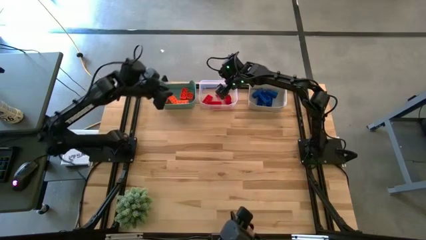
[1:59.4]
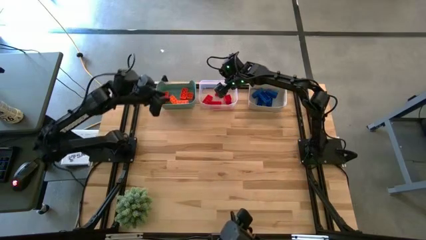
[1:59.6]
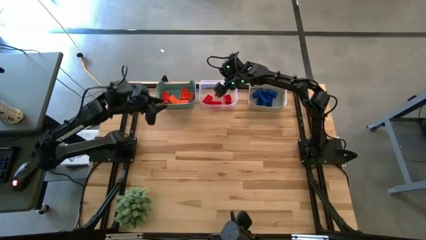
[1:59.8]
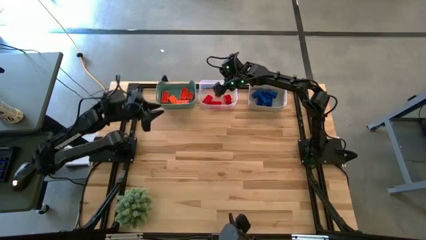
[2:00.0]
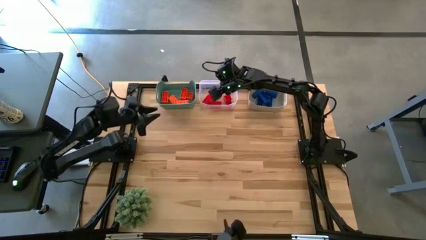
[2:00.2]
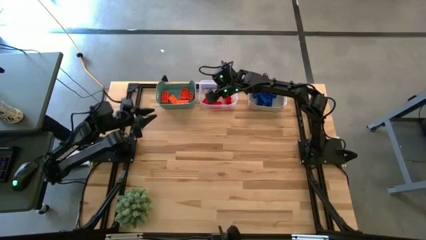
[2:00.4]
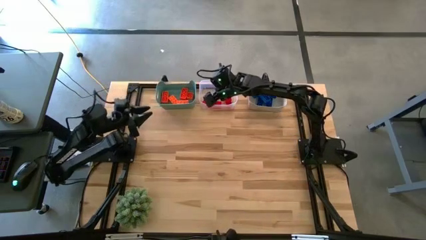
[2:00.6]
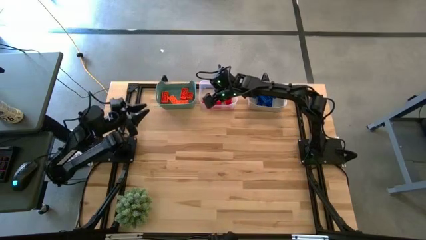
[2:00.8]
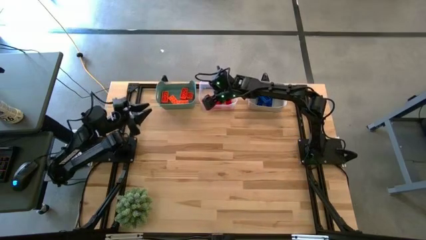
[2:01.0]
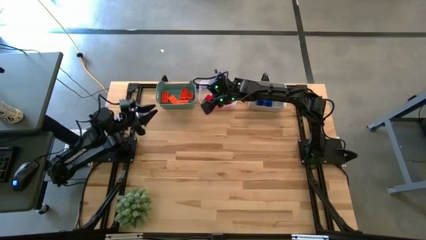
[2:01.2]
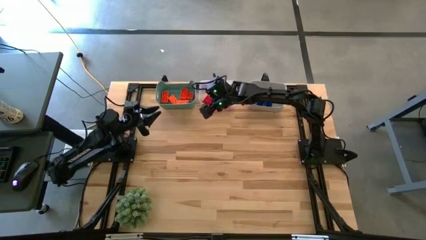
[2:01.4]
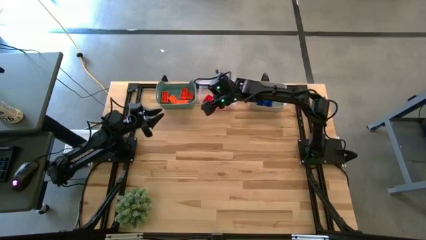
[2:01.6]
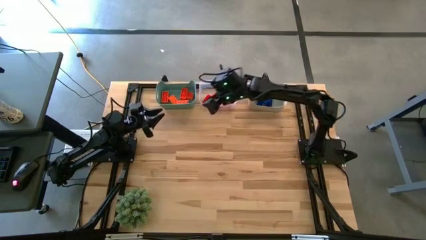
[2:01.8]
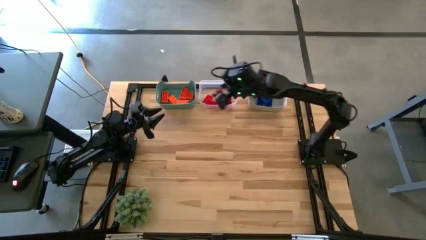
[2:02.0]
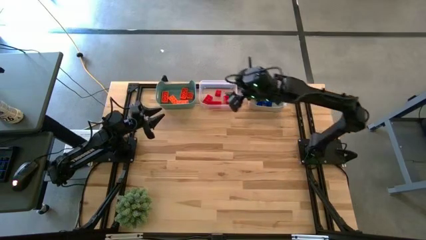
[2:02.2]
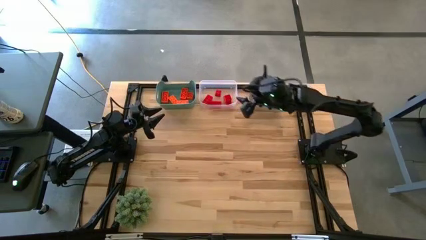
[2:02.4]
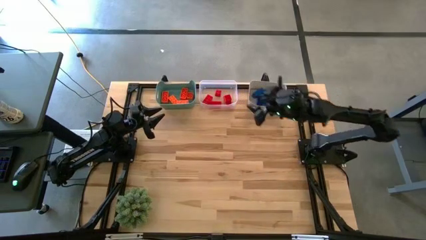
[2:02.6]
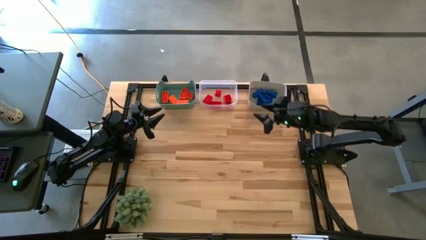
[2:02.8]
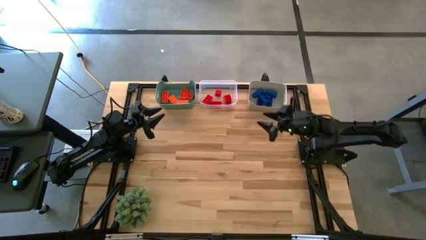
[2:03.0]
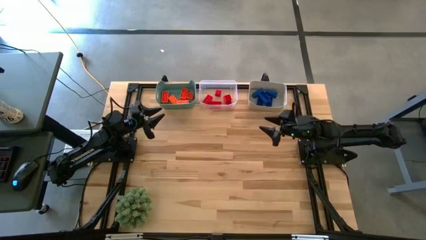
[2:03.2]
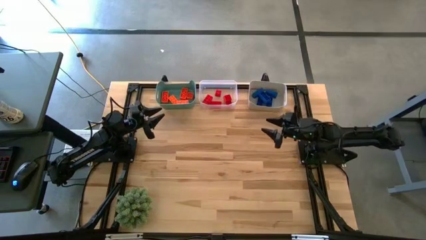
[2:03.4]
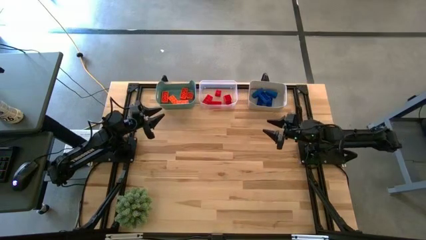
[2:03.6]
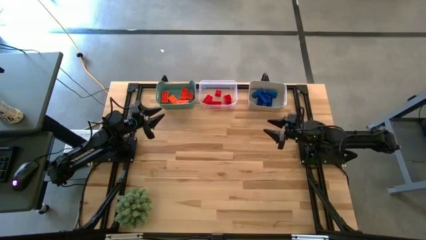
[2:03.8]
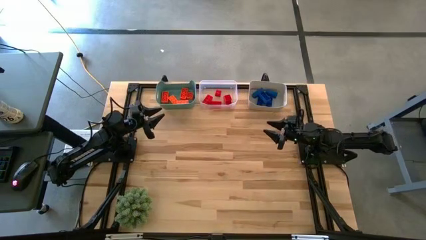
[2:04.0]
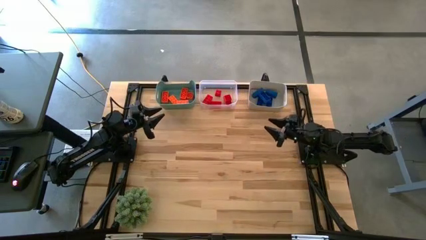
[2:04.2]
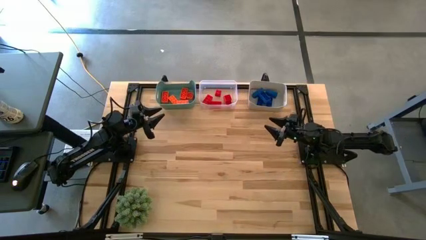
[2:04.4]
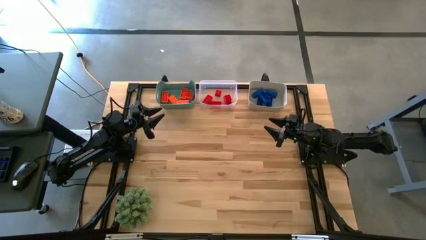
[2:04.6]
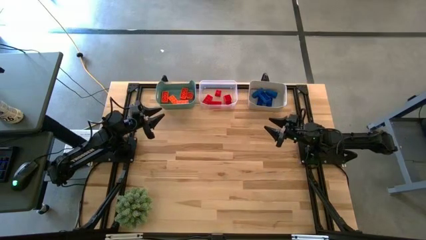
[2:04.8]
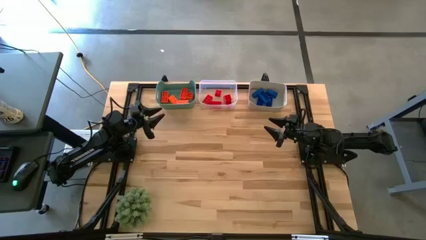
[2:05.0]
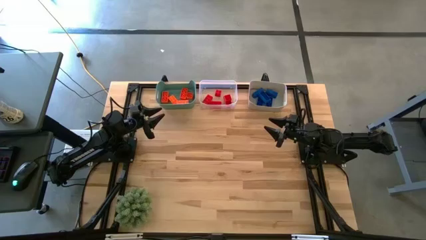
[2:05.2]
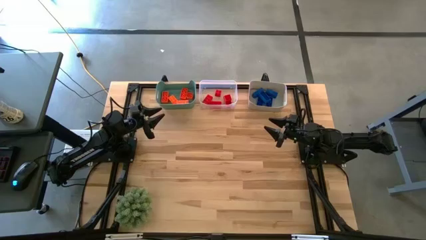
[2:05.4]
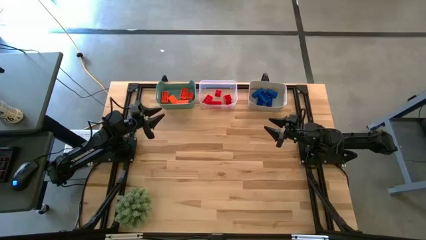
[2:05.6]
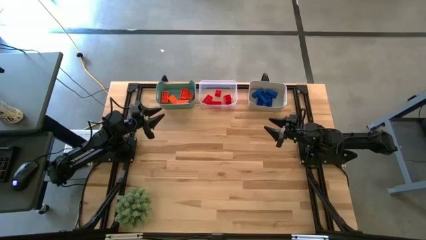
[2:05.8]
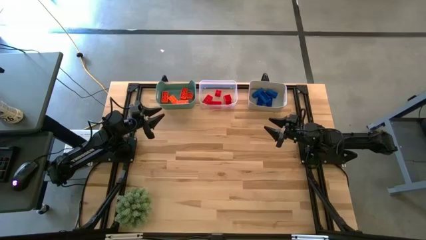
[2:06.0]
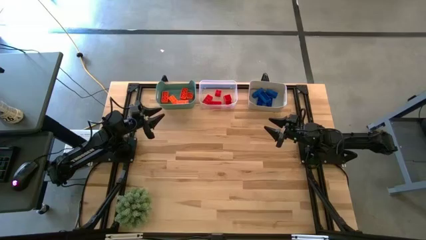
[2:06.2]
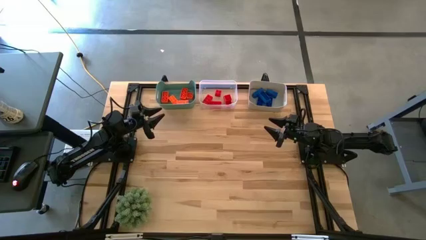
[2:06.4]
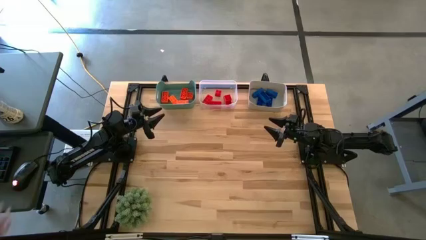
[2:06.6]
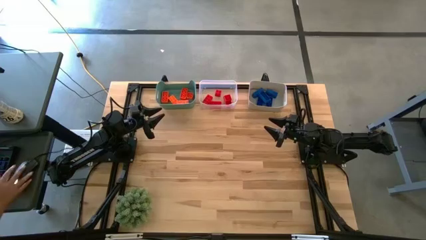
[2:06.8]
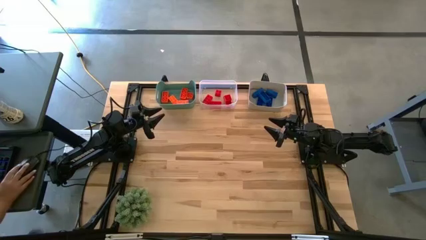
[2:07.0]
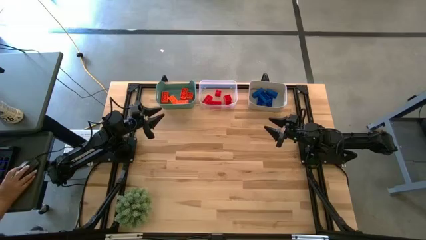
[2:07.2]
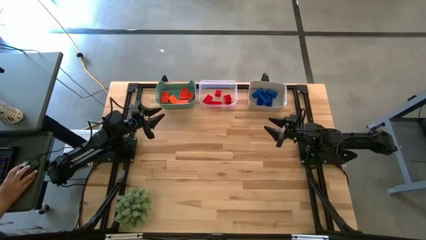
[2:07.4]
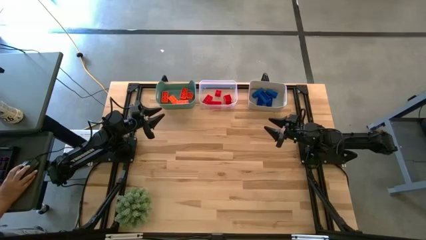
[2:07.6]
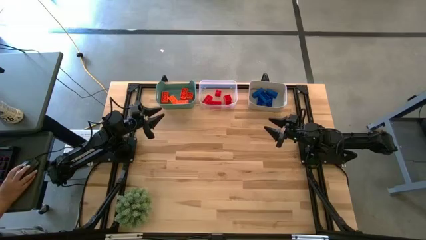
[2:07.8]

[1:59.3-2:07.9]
Task: Sort & place blocks by color
Return to Home Position

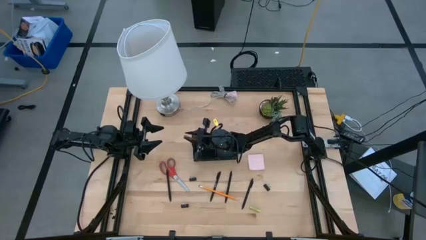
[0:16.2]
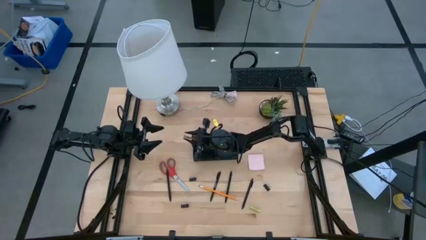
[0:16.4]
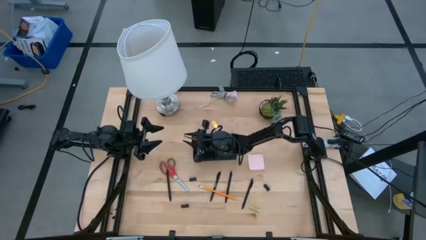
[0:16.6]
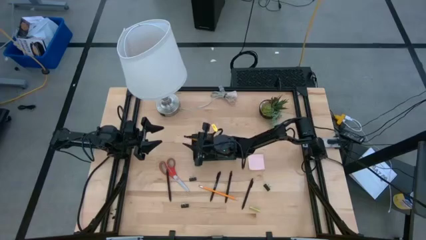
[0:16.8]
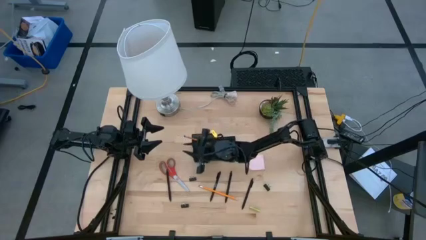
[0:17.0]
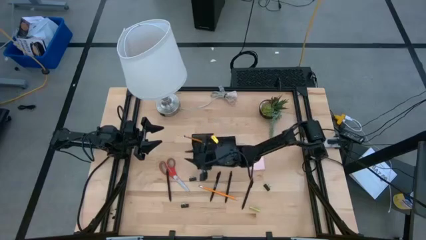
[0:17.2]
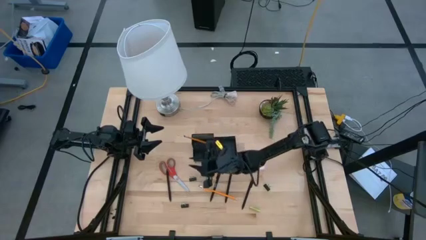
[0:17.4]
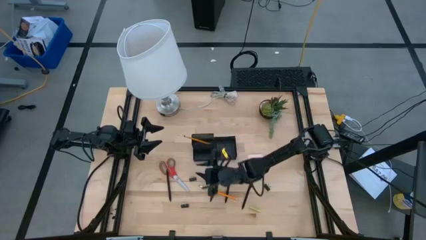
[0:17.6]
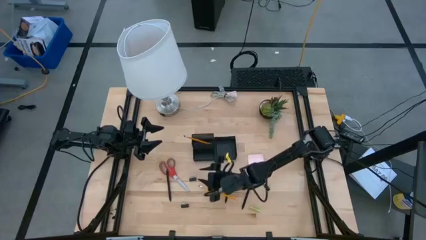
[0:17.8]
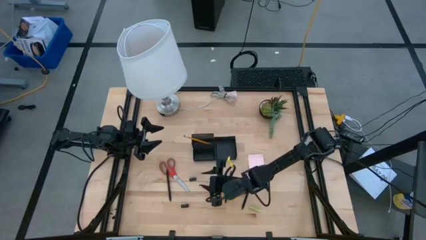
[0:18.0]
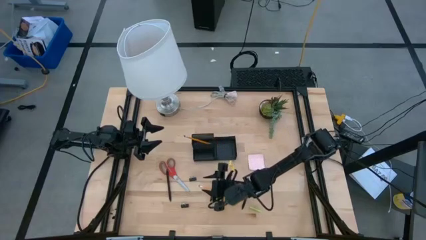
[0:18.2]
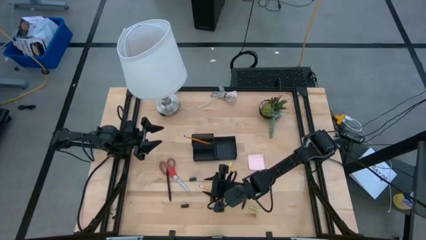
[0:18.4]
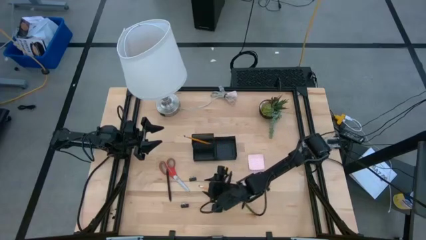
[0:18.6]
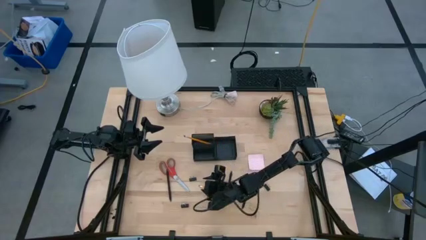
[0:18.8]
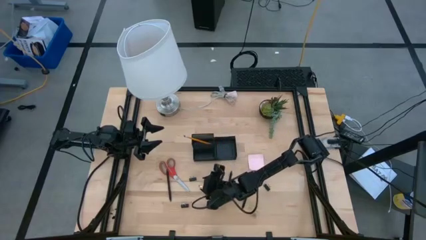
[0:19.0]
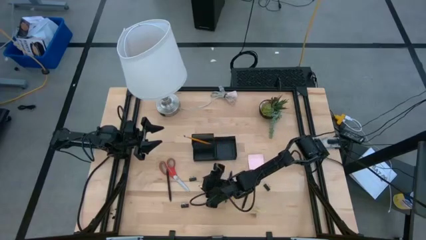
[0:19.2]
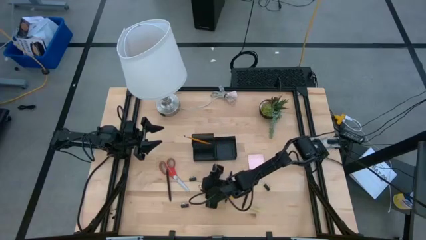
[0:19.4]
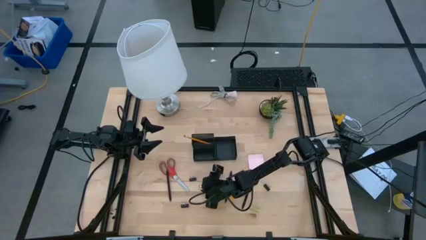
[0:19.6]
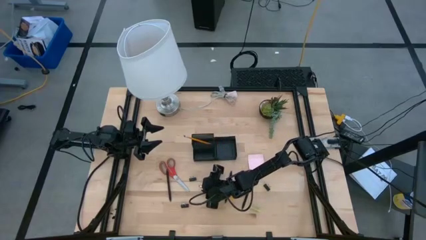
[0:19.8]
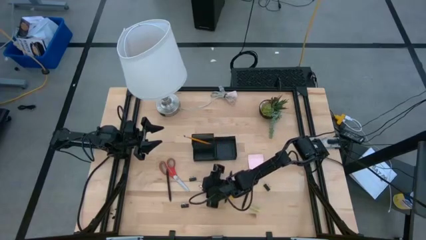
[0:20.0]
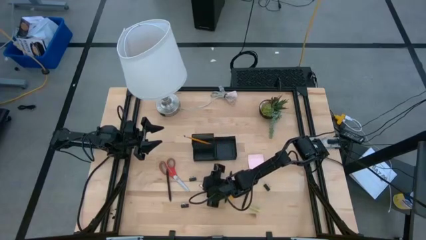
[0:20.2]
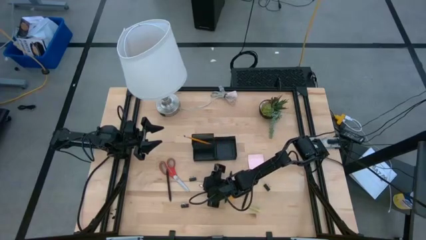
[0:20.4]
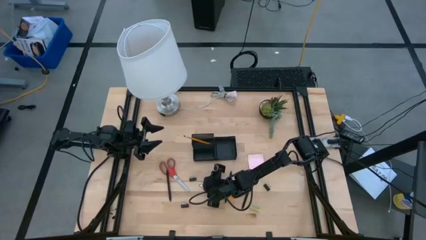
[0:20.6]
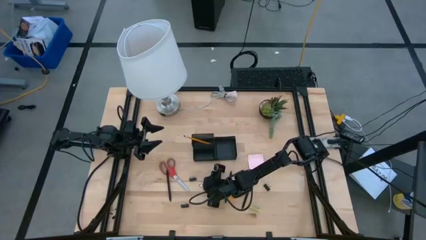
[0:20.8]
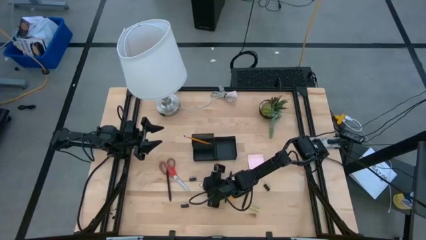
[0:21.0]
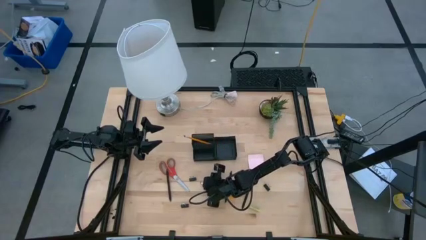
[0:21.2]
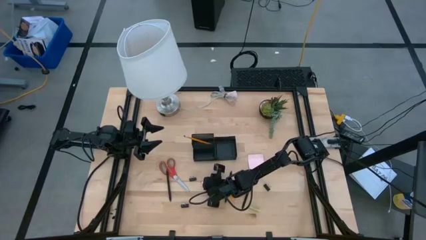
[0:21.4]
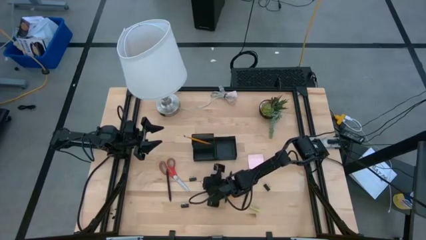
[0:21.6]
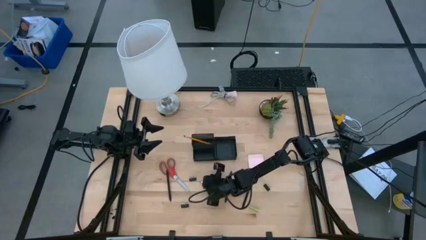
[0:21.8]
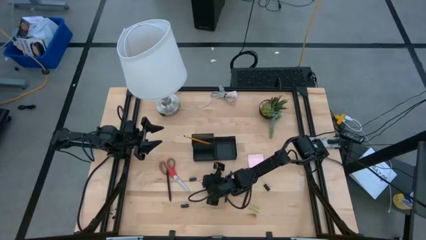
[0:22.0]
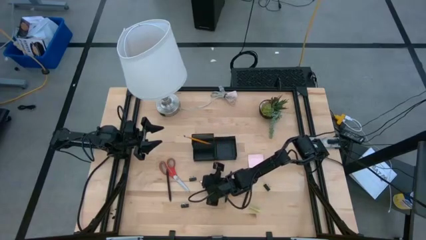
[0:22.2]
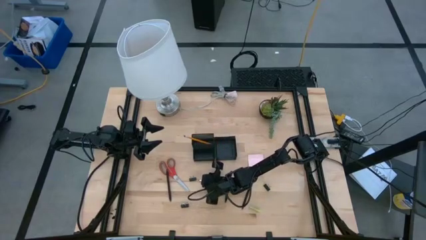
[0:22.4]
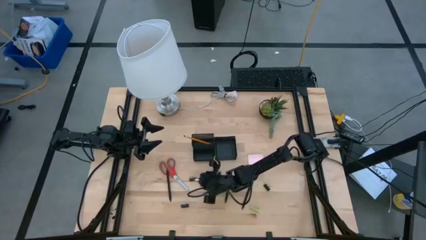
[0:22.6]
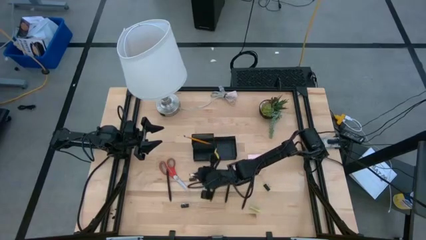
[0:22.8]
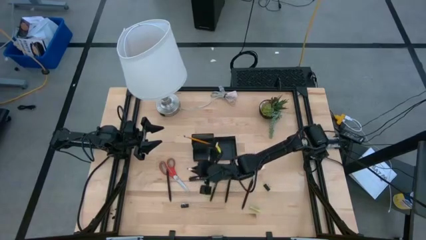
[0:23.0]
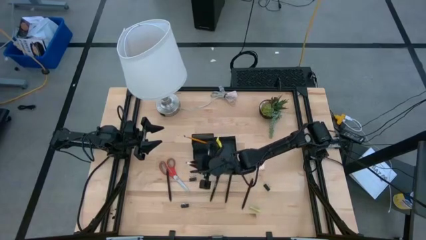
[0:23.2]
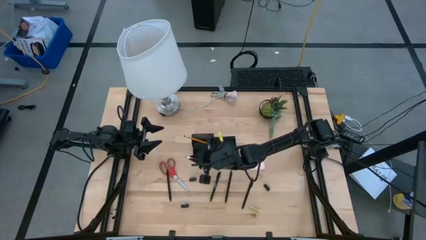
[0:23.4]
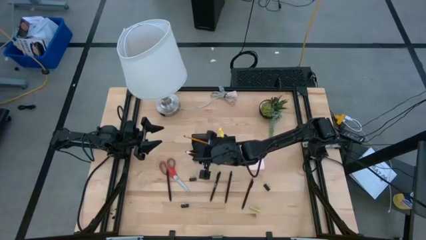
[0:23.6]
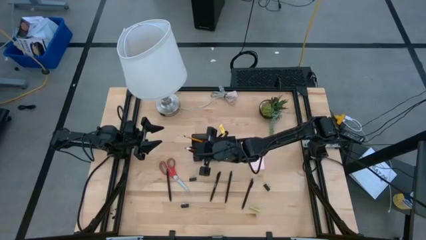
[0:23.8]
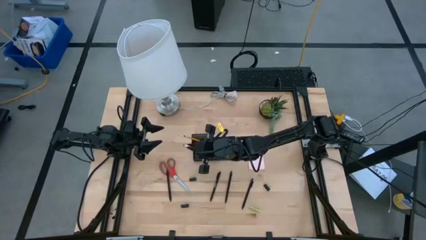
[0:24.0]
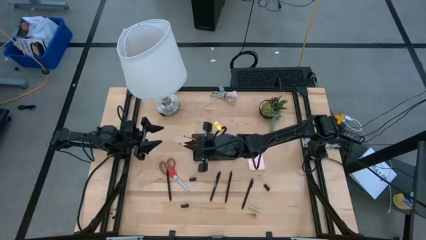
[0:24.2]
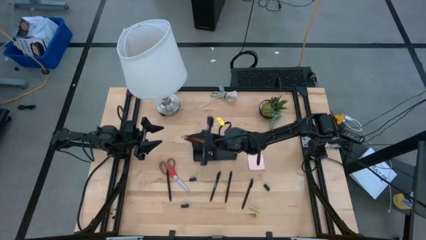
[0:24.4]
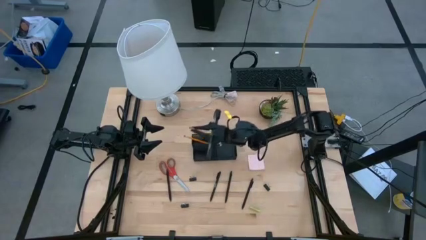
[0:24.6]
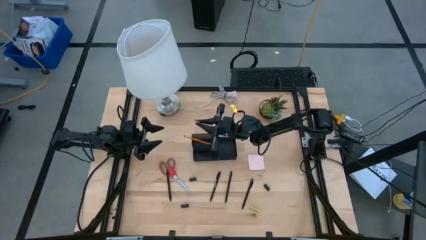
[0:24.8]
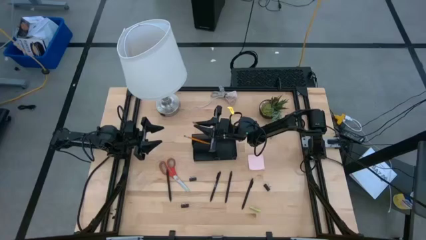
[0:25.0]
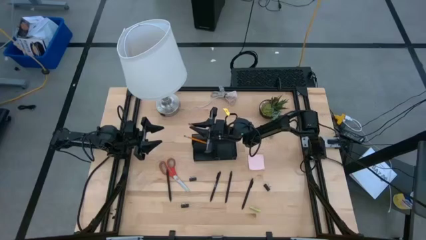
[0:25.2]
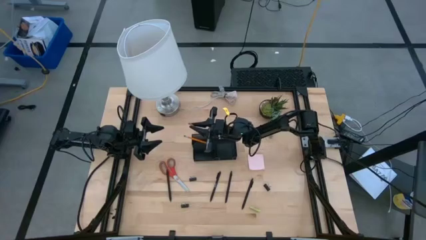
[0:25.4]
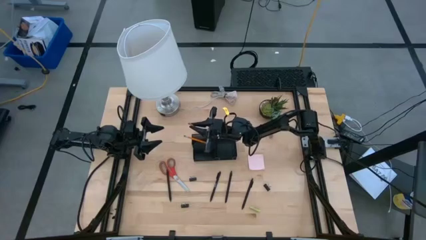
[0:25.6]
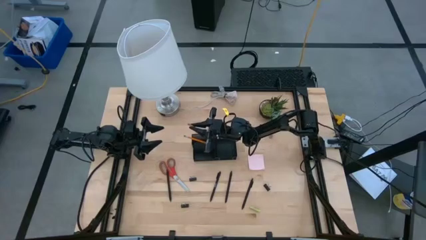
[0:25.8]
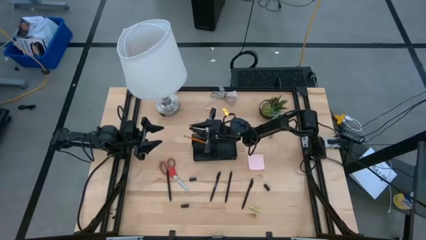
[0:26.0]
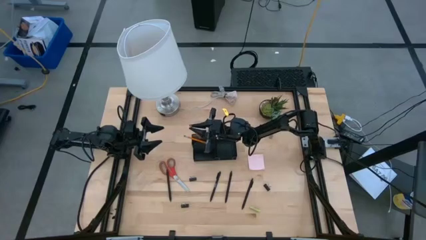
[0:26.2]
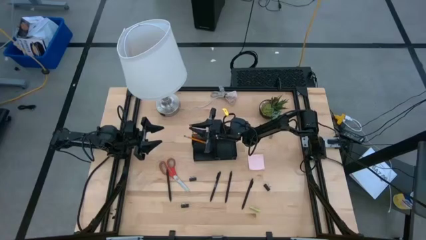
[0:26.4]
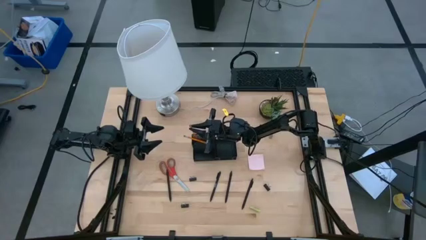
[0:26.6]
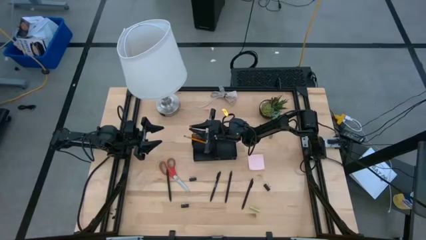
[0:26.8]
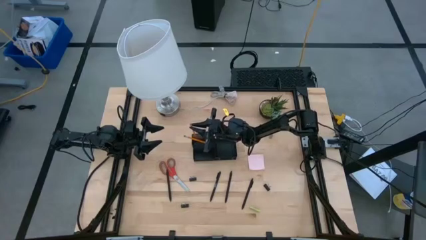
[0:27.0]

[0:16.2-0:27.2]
Task: Pick and place office supplies into organizer
Put the orange pencil into the black desk organizer
